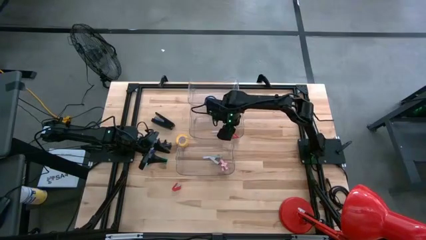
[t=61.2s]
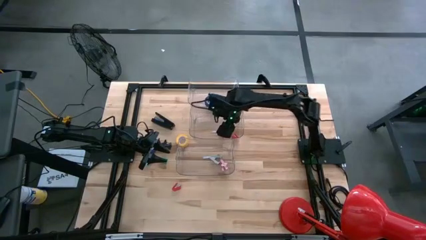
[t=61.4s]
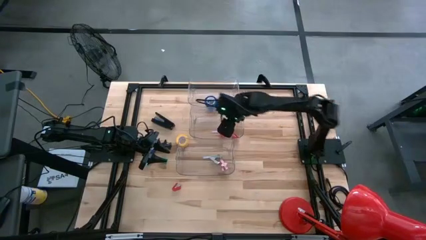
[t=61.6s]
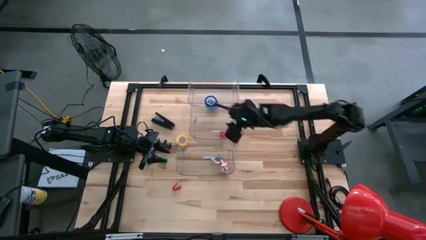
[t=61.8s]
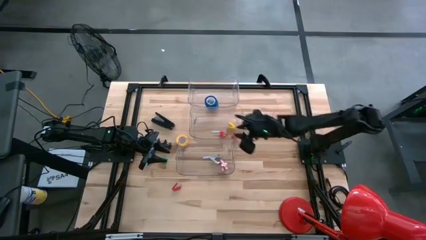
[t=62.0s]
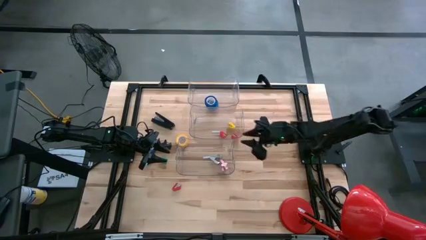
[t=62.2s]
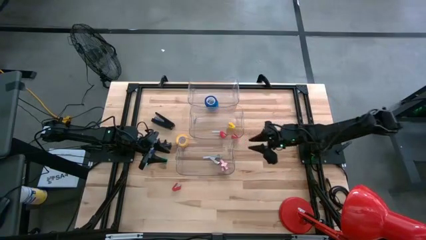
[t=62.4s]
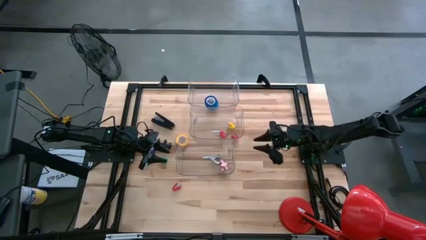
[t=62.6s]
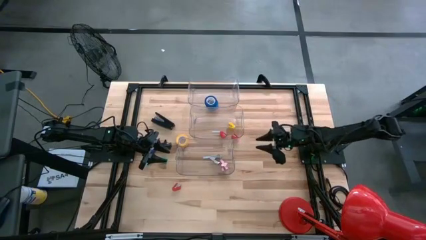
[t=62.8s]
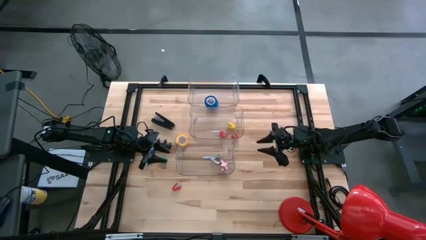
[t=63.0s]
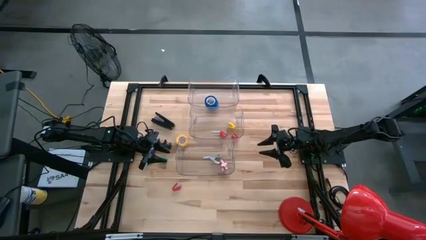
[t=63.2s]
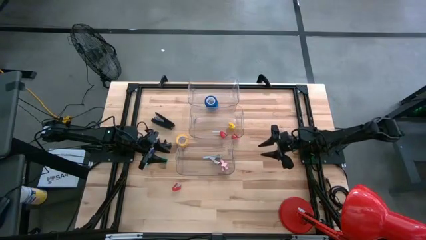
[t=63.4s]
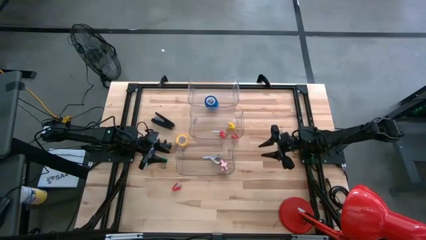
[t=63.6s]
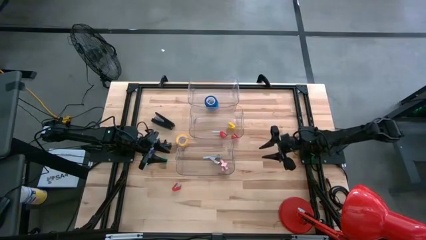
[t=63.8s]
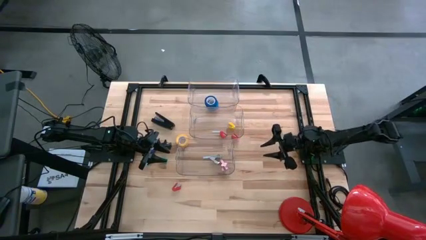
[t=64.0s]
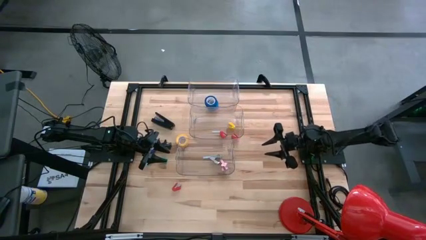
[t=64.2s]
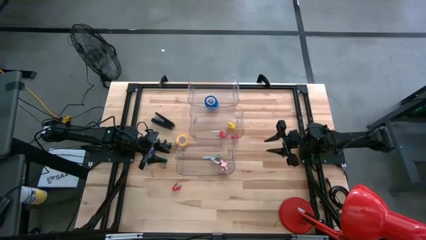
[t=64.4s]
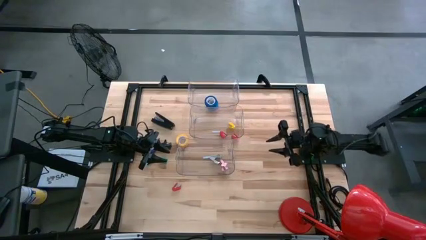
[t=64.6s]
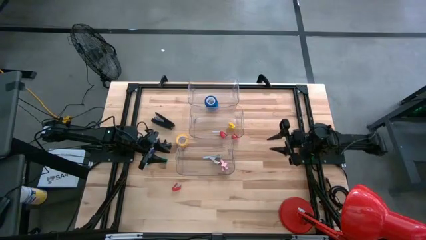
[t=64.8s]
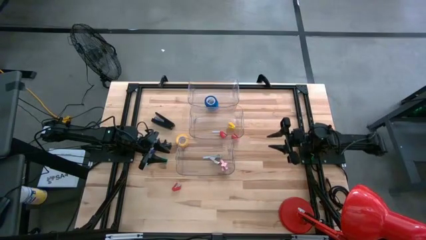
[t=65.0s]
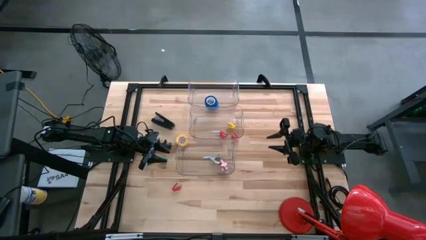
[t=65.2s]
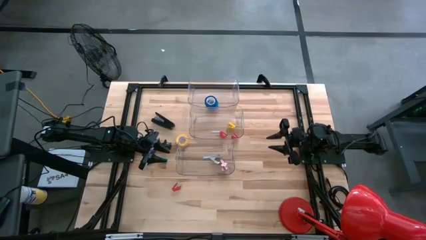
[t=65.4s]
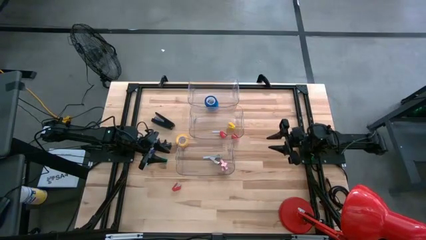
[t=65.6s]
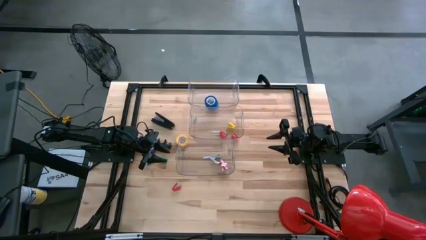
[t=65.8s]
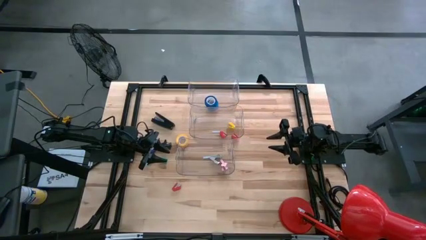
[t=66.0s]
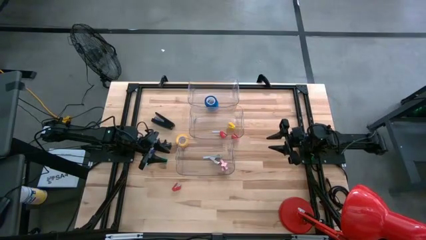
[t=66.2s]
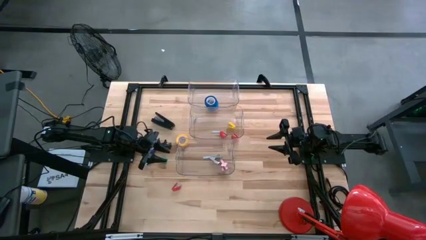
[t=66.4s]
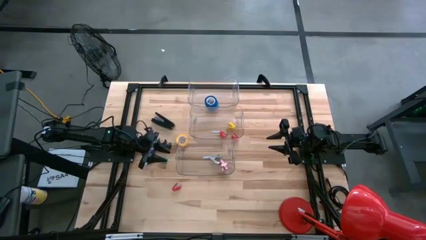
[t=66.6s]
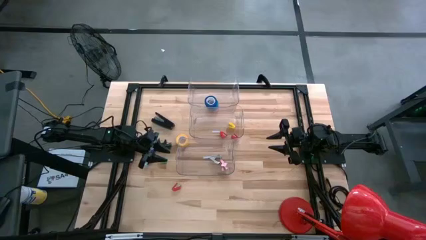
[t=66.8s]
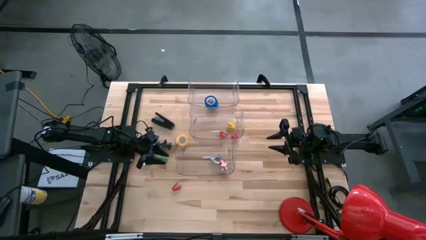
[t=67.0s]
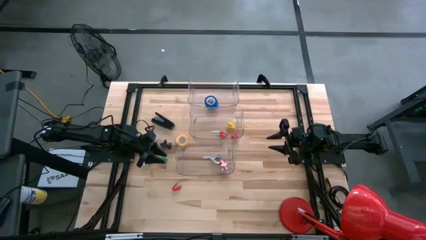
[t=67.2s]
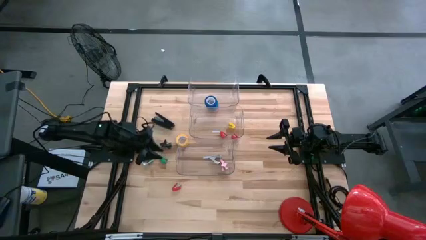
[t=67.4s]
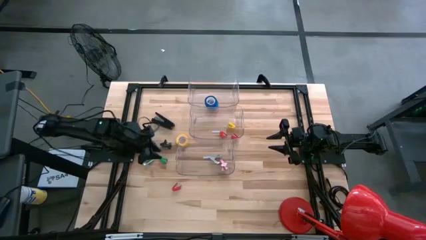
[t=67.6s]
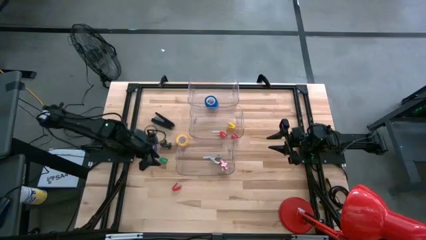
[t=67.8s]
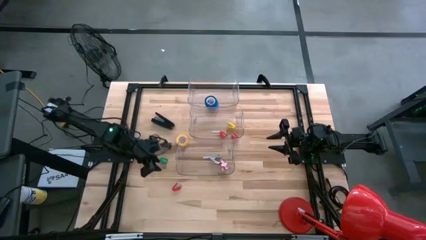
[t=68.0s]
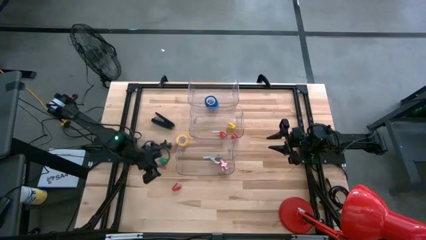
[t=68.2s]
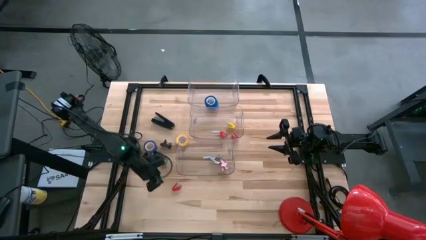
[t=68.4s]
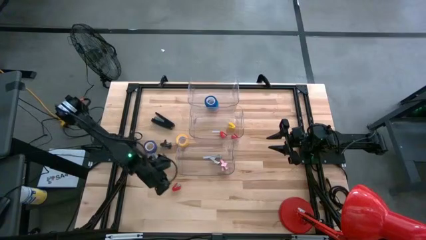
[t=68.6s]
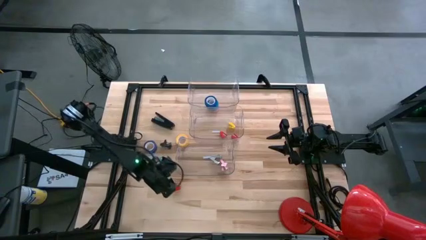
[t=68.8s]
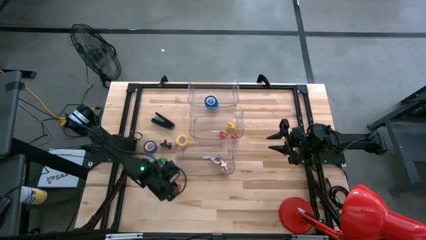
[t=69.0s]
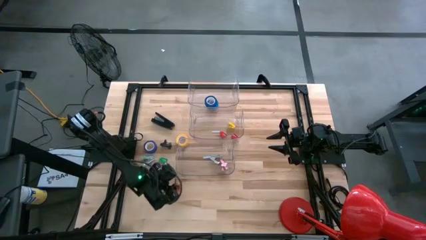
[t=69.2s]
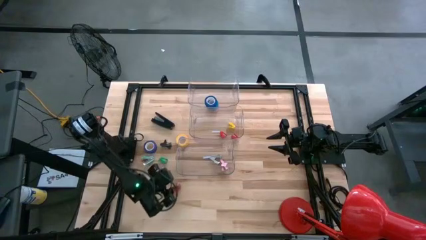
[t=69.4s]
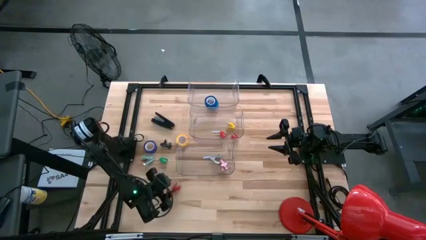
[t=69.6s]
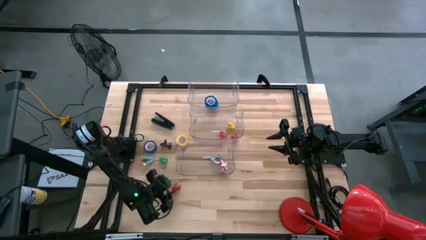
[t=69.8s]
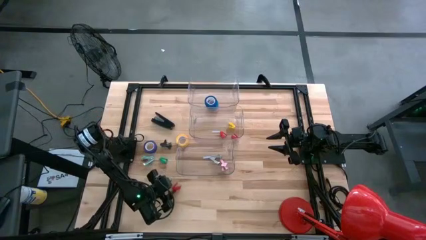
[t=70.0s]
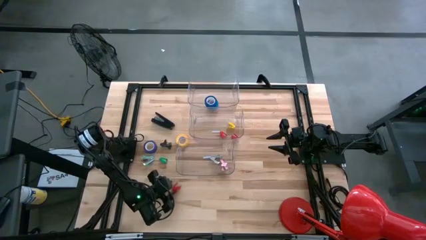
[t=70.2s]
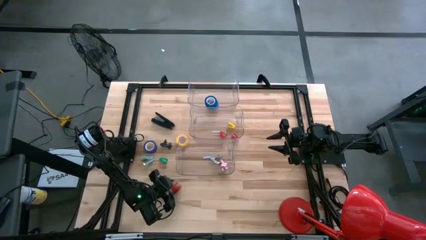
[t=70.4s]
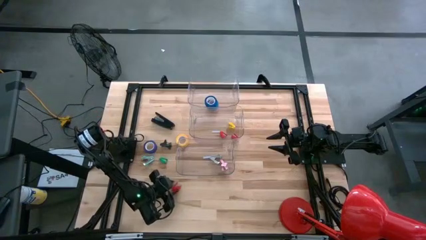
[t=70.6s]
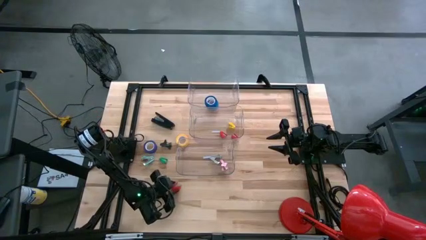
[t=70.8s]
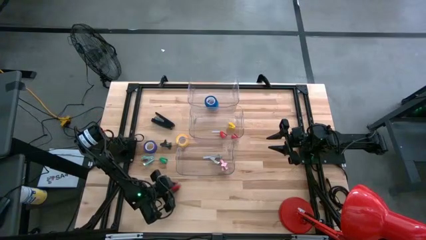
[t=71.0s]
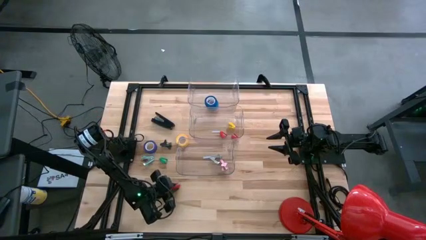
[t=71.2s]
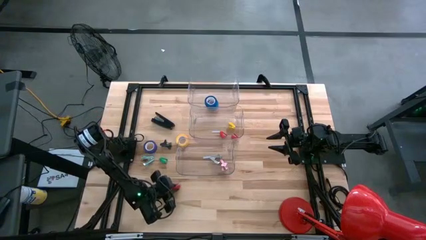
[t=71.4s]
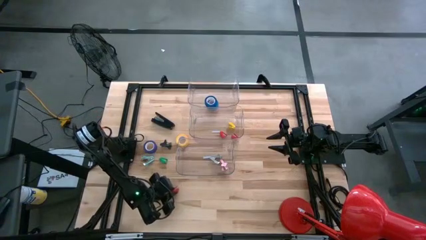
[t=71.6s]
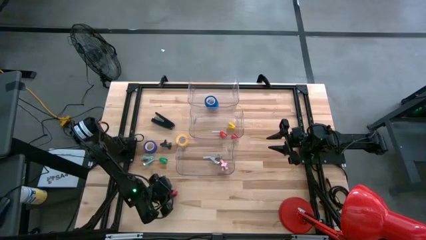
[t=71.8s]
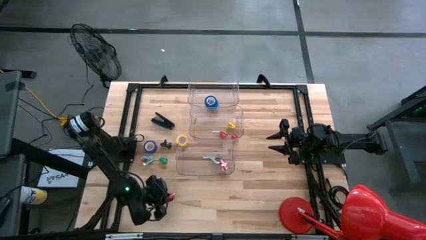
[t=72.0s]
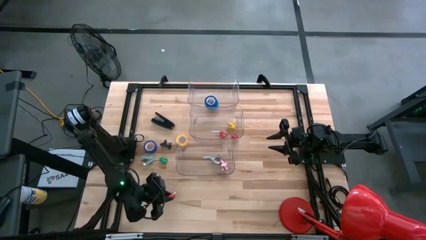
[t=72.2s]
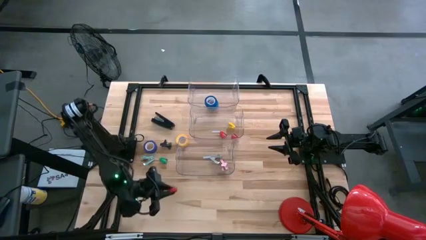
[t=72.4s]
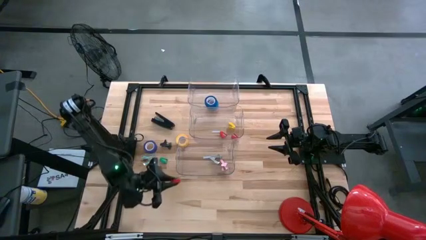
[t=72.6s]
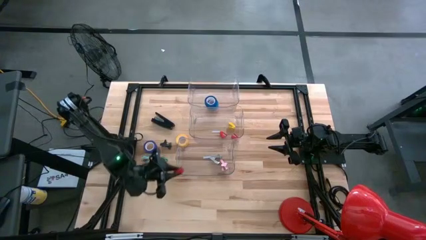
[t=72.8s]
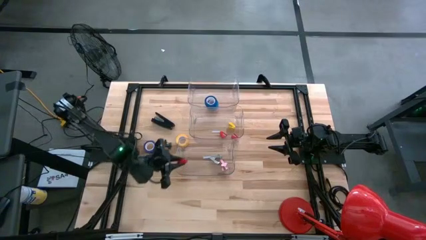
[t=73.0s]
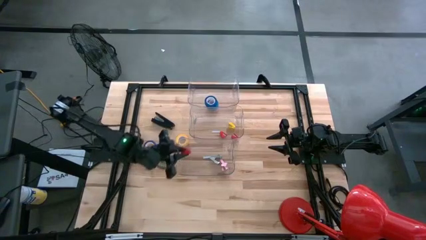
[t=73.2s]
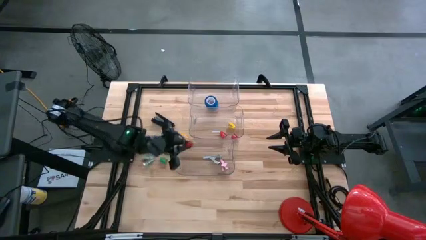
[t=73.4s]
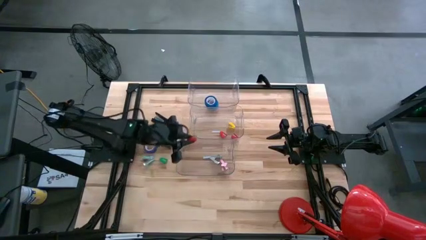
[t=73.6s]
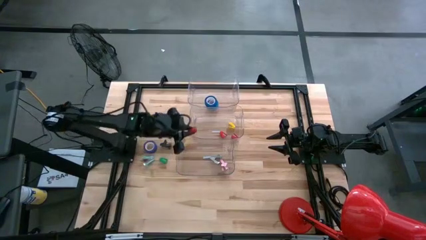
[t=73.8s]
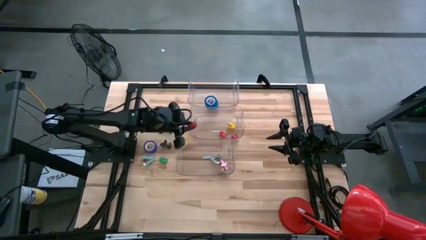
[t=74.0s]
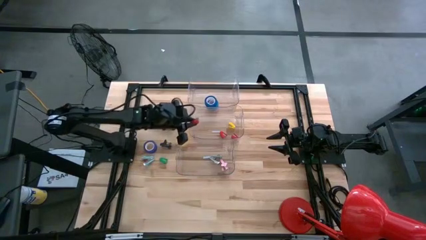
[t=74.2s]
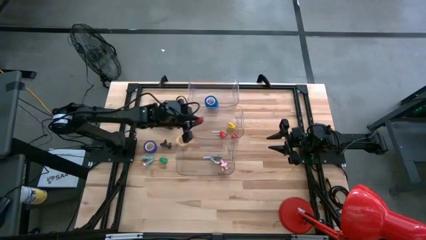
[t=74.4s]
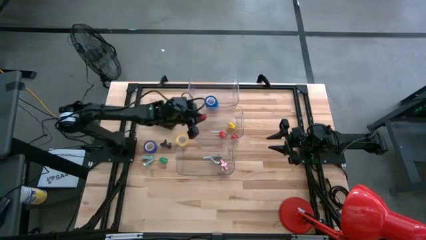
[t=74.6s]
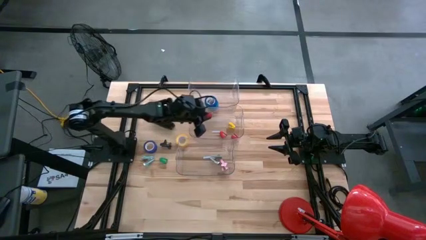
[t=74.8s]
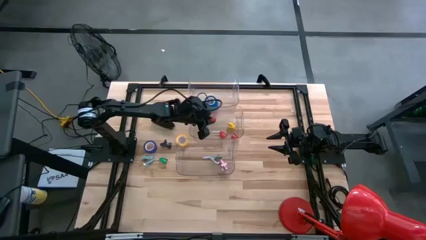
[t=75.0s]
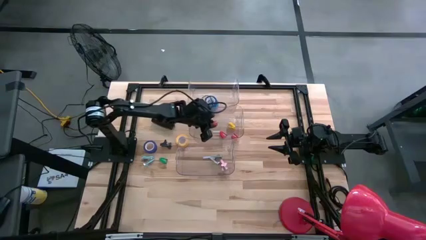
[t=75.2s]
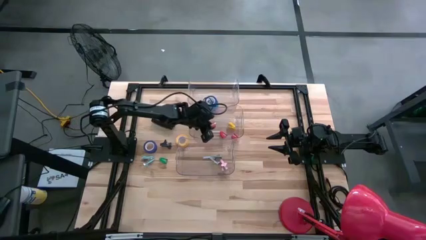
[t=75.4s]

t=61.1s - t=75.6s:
Task: Pick and place Stapler, Stapler remover, tape
Put the red stapler into the middle transparent bin
